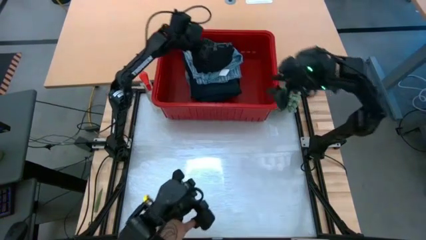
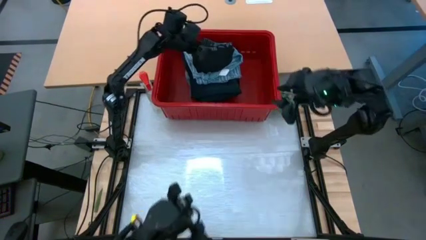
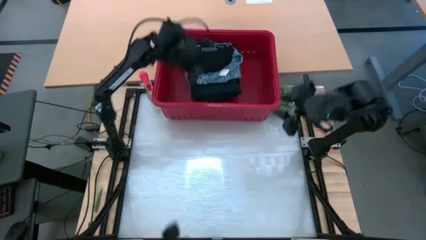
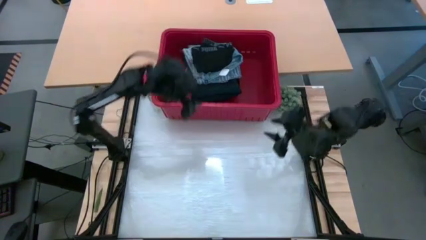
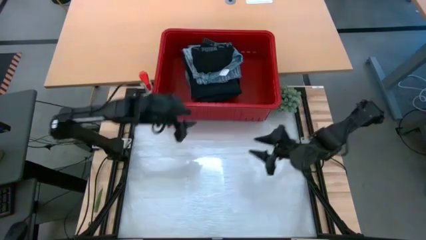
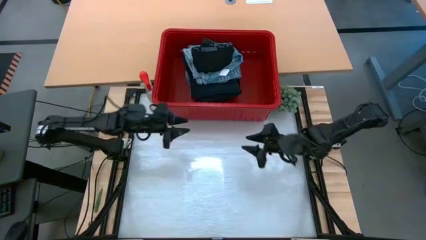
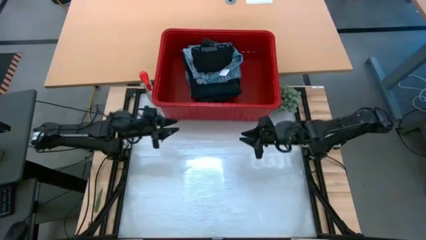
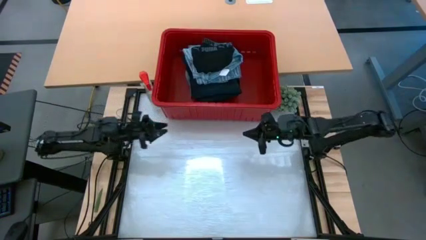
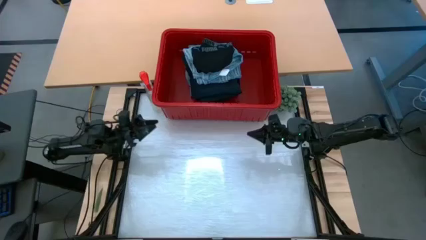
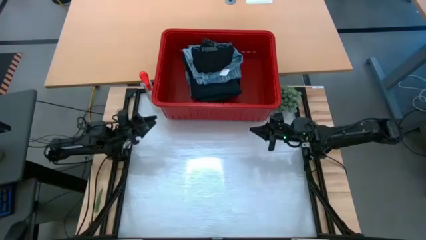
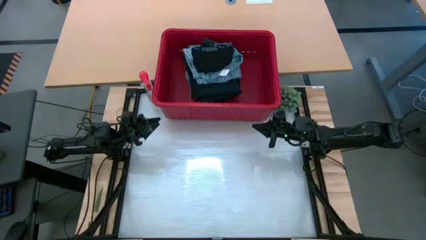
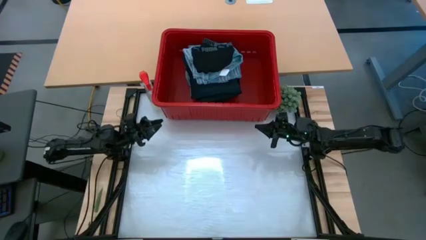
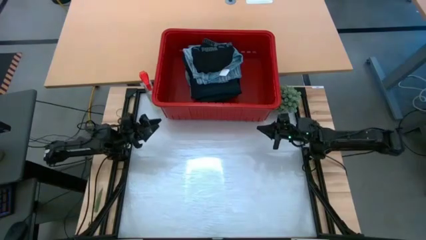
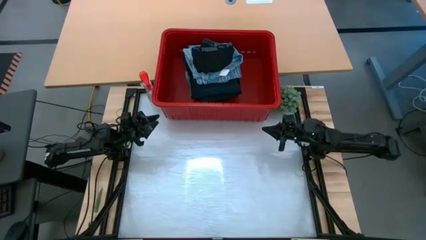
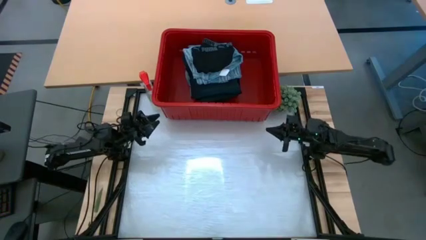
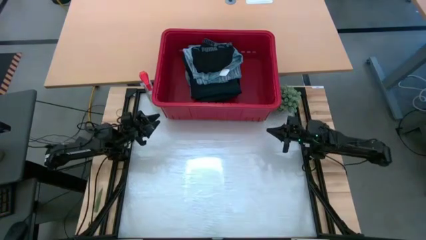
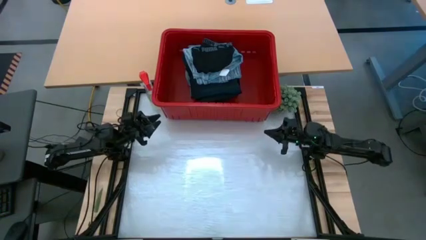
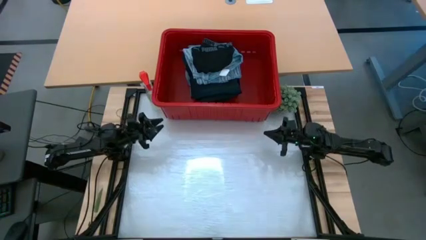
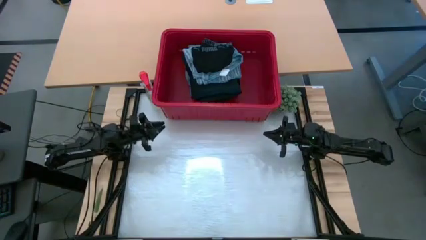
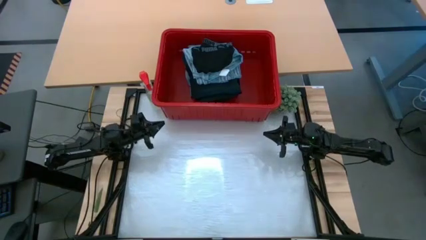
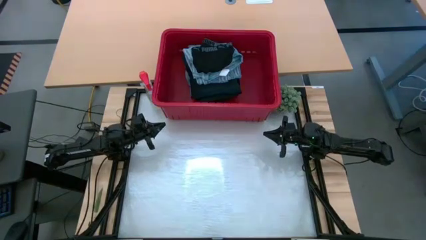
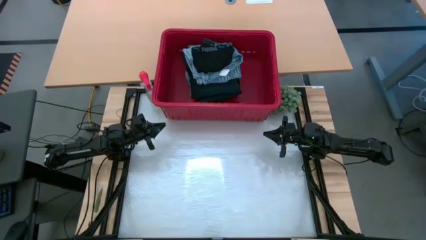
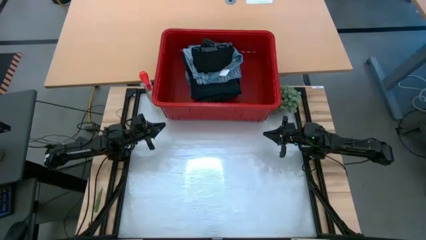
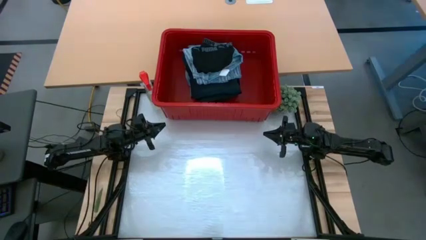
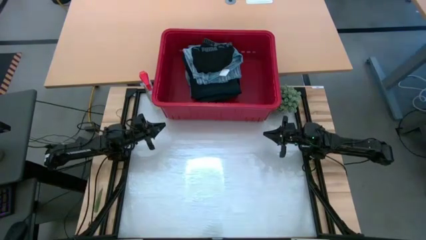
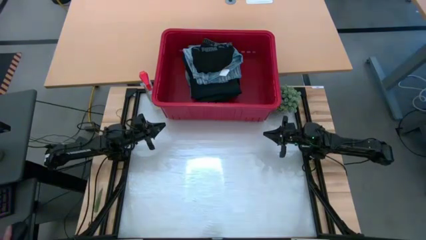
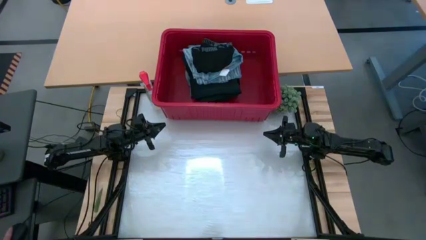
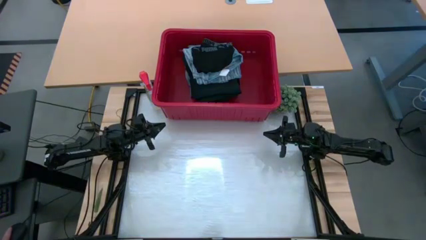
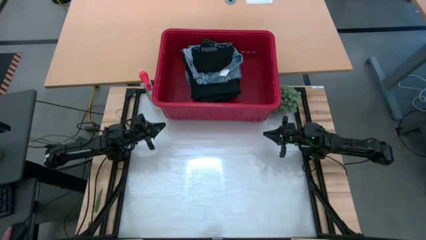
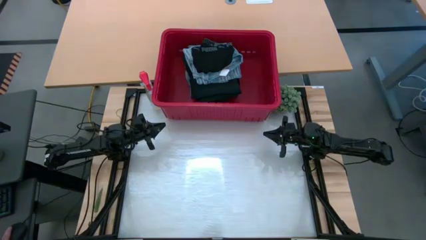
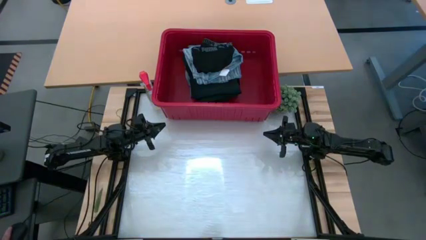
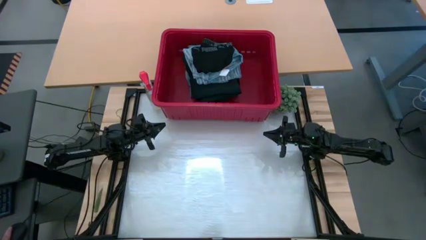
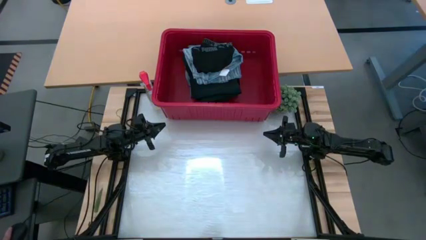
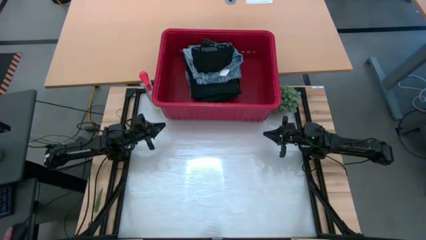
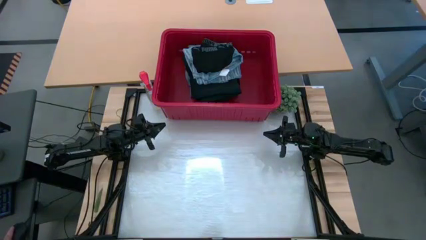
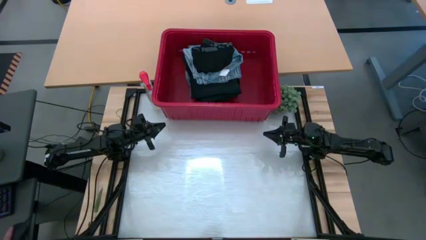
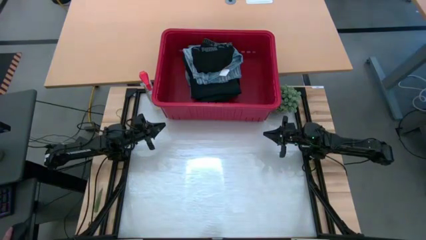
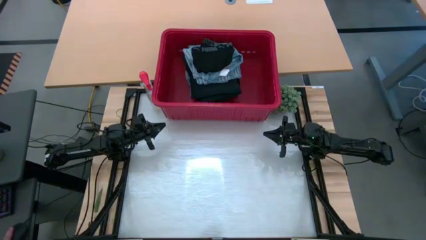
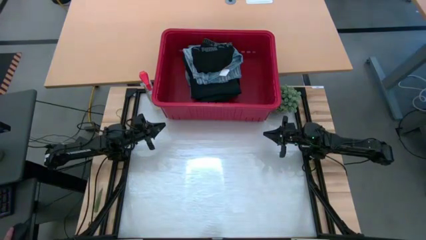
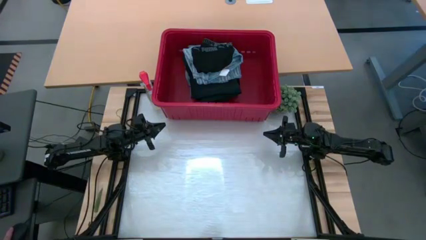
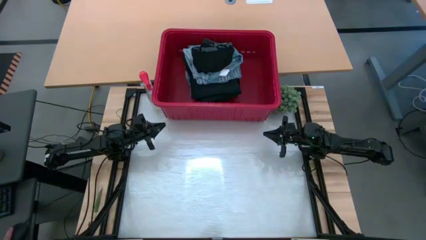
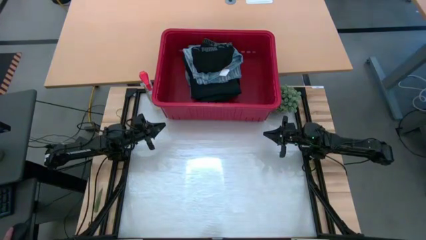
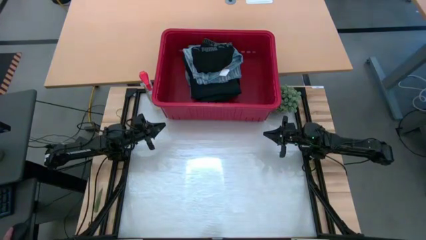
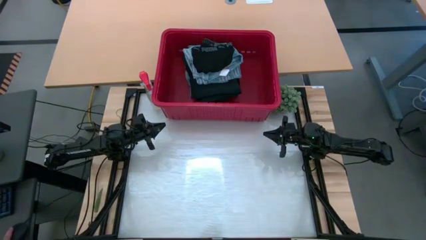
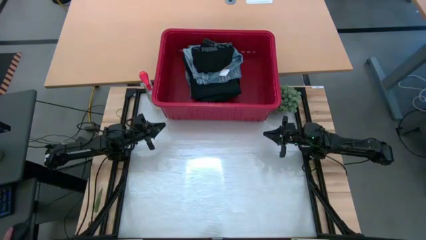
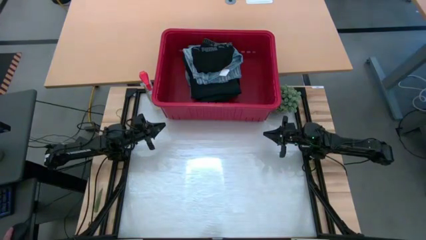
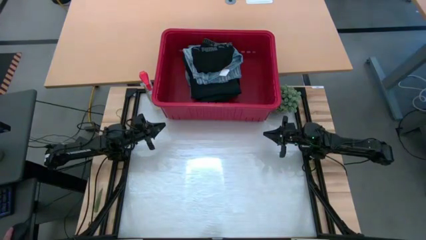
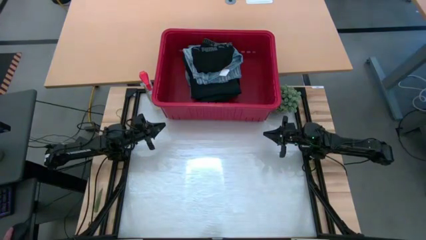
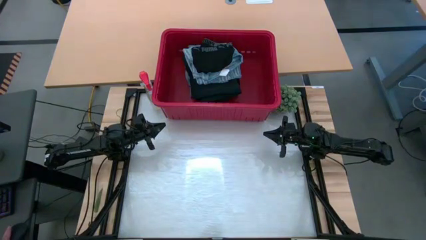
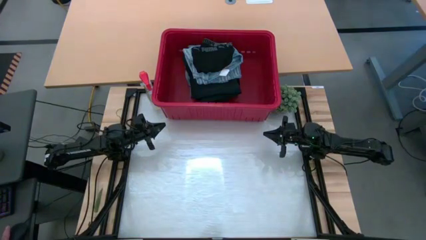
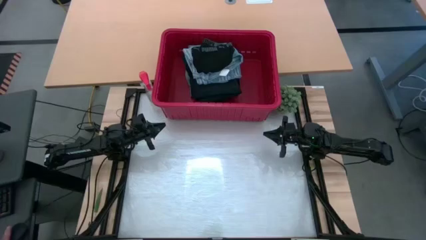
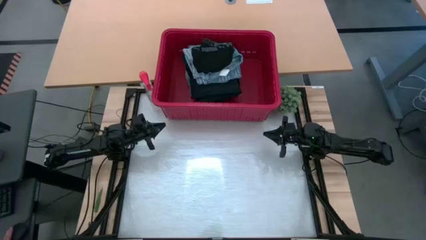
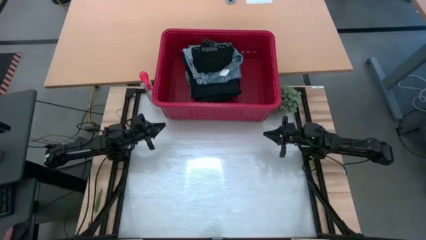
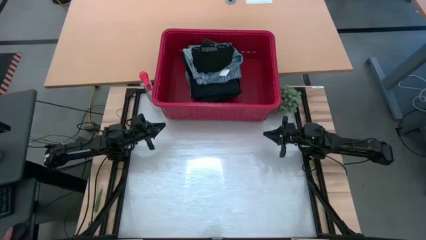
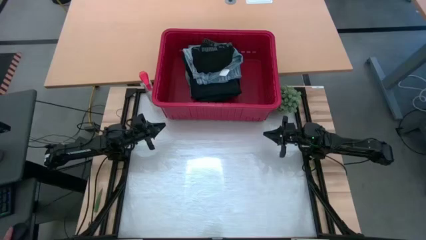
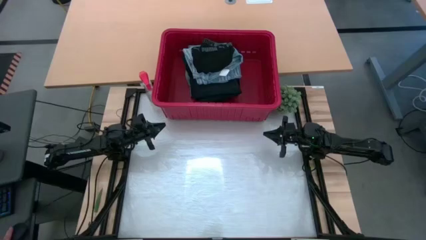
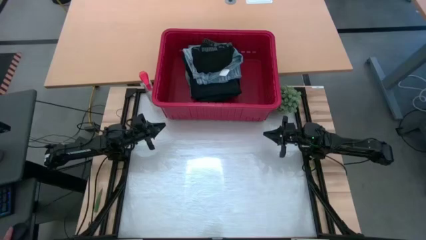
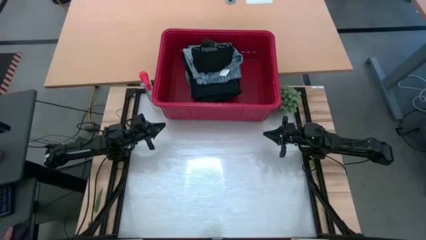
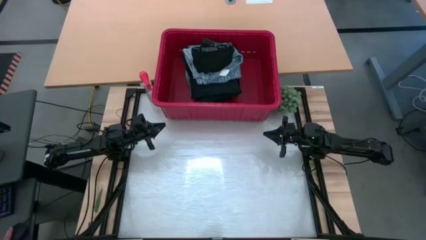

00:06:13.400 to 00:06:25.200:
Task: Fold Laundry from Bin
Return to Home Position

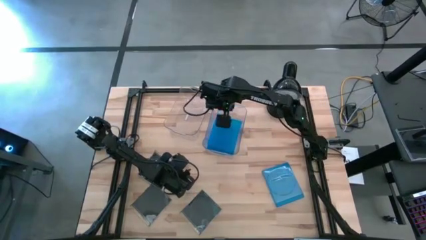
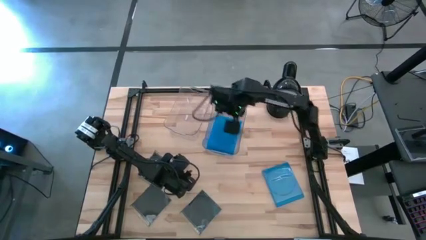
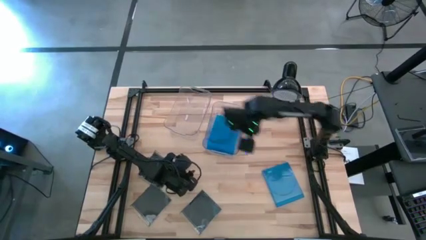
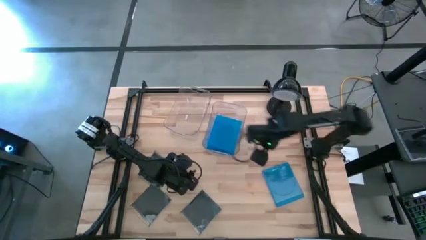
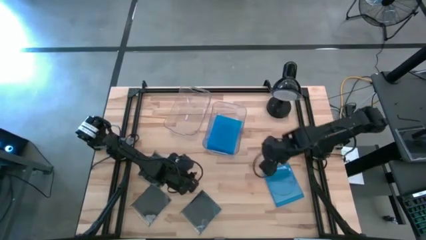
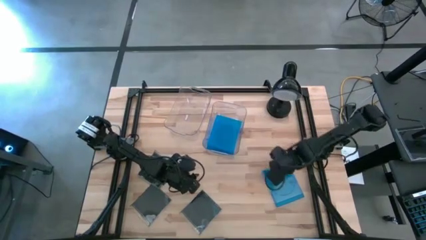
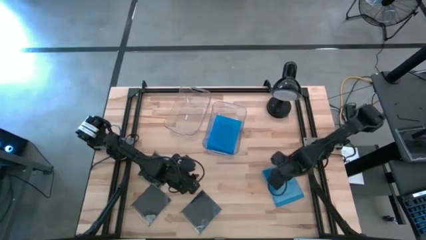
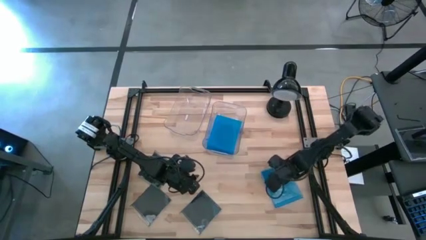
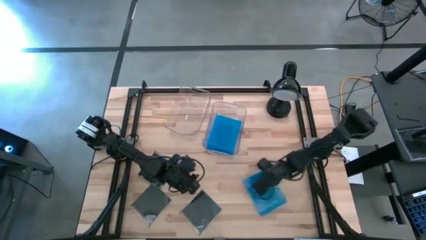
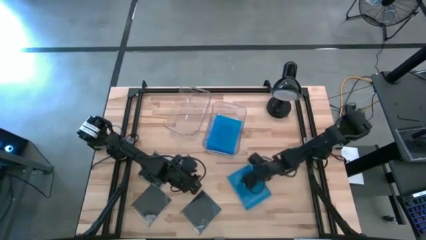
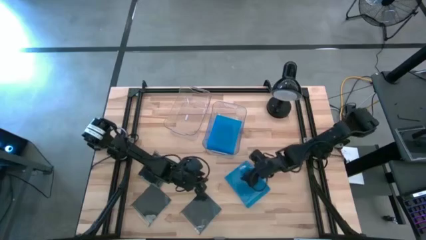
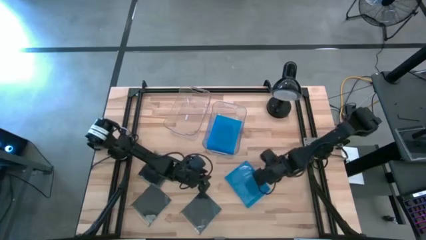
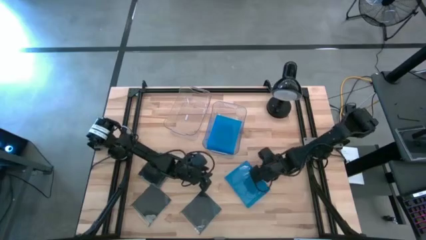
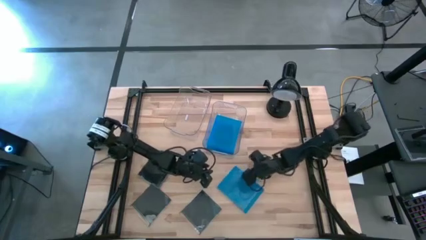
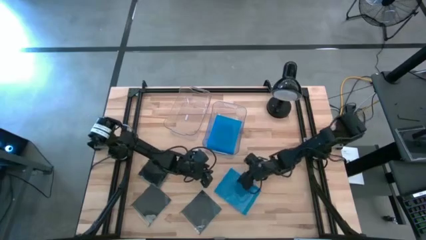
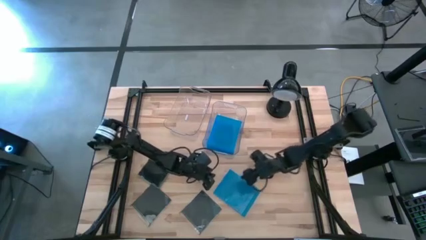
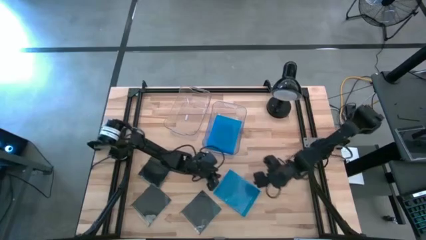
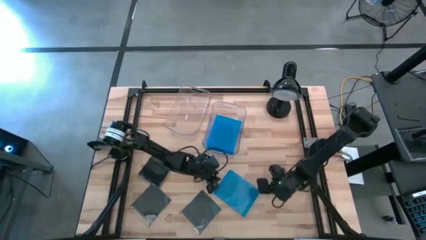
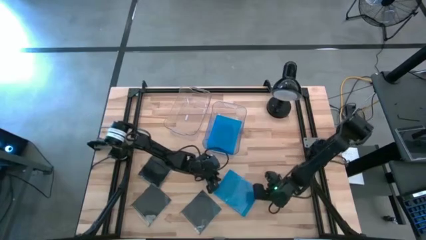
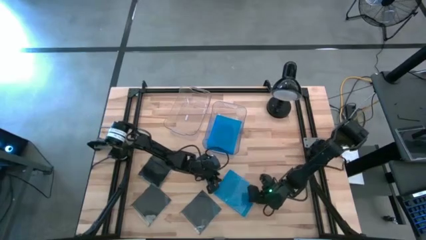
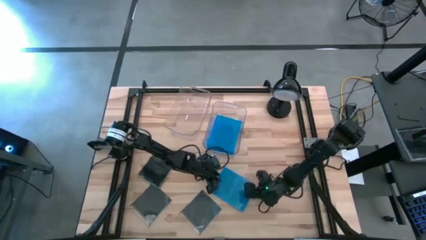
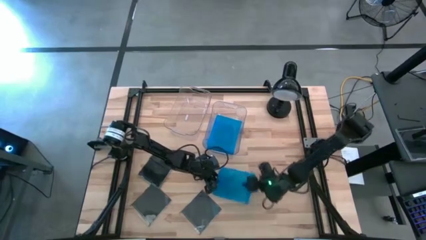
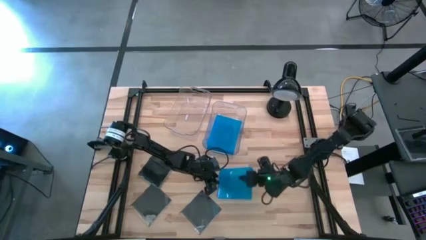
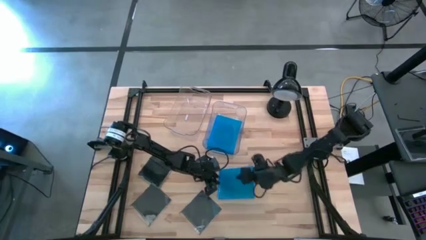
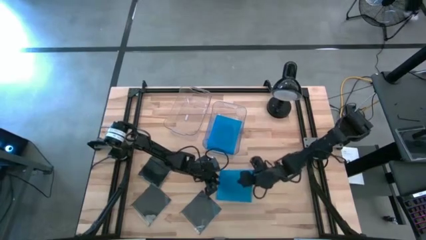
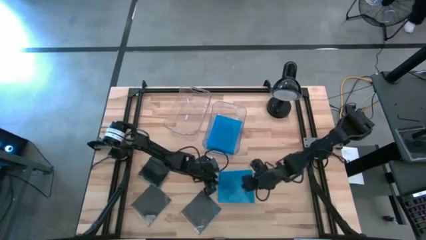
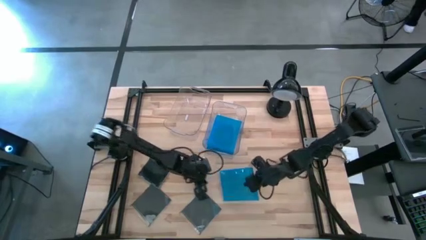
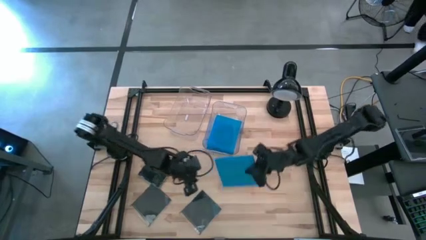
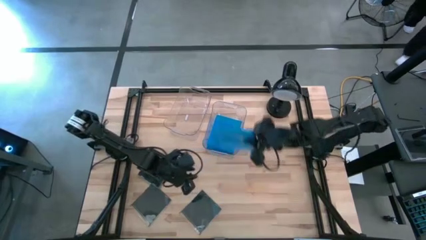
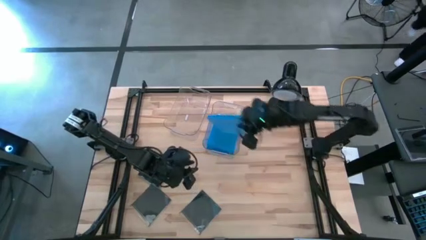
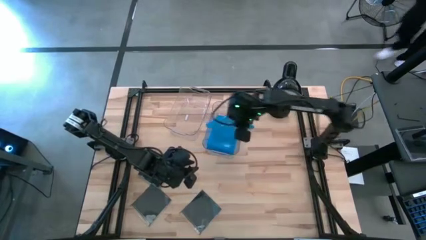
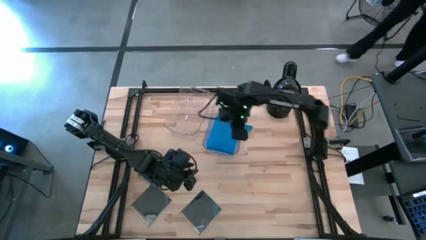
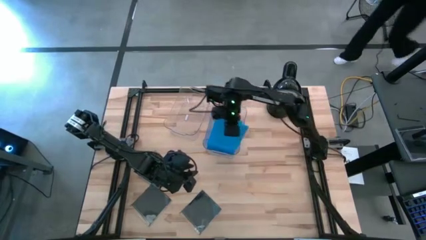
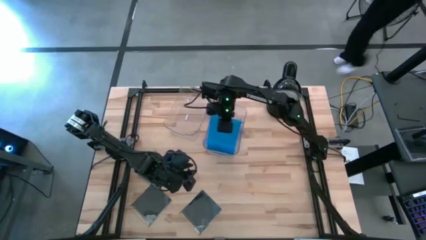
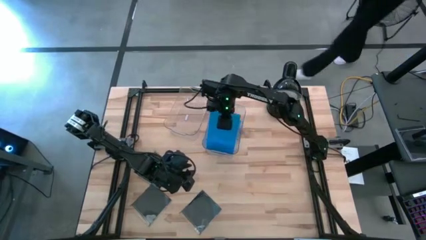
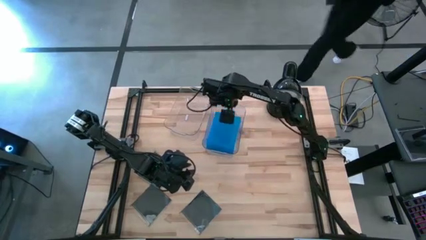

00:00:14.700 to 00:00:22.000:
Task: Pick & place jewel cases by type
Put the blue CD case into the right transparent bin
